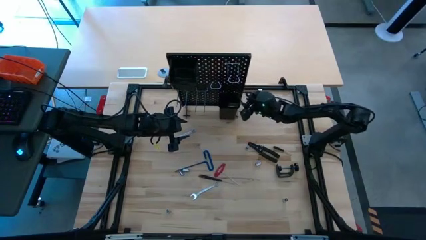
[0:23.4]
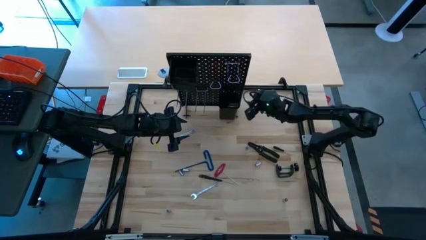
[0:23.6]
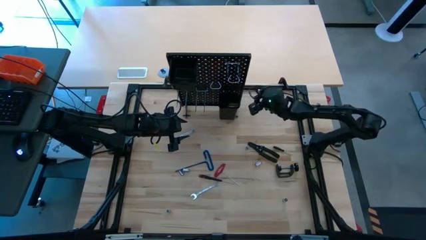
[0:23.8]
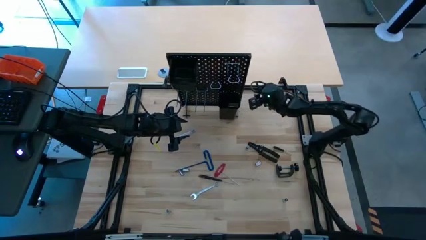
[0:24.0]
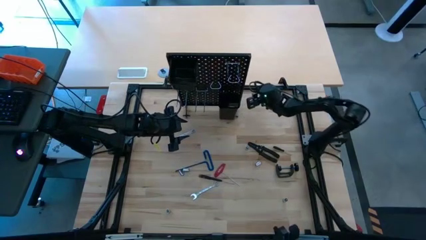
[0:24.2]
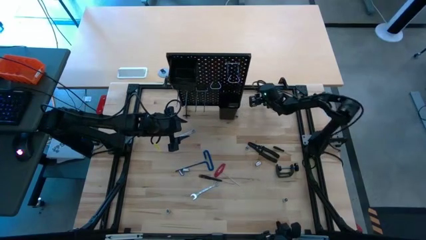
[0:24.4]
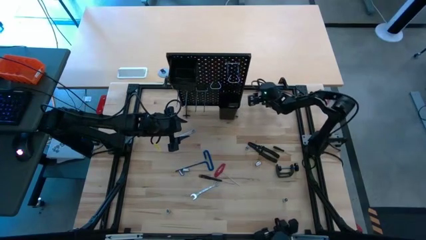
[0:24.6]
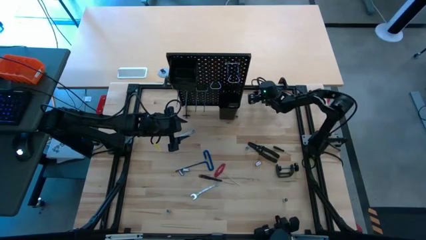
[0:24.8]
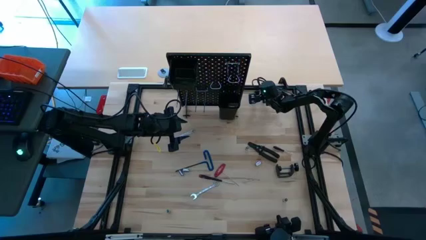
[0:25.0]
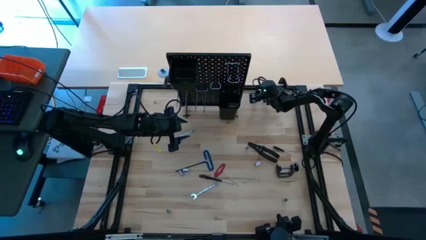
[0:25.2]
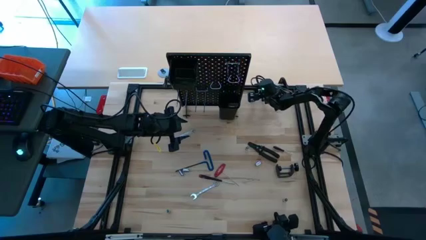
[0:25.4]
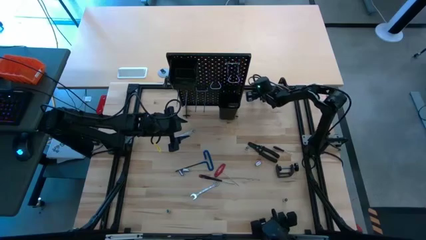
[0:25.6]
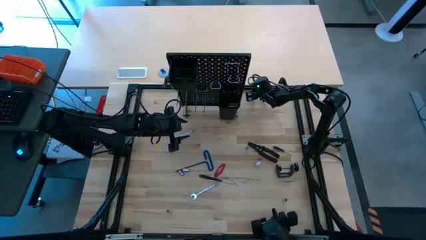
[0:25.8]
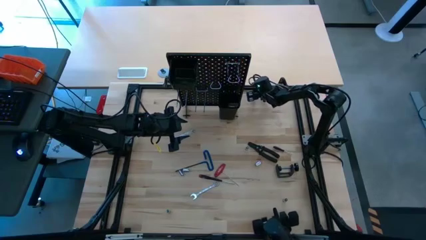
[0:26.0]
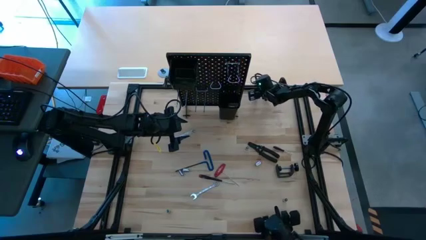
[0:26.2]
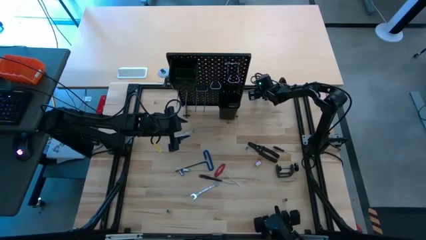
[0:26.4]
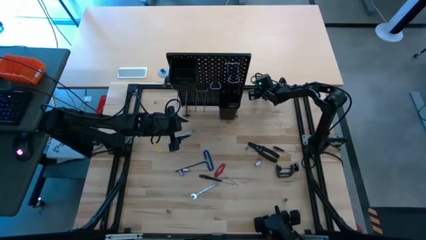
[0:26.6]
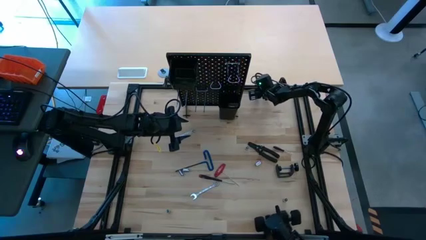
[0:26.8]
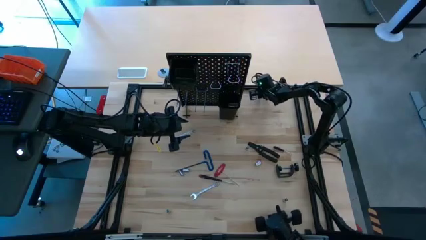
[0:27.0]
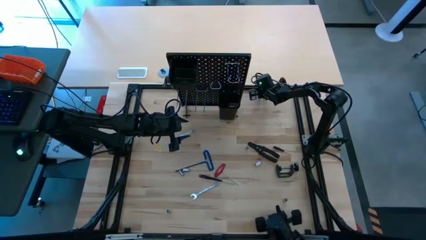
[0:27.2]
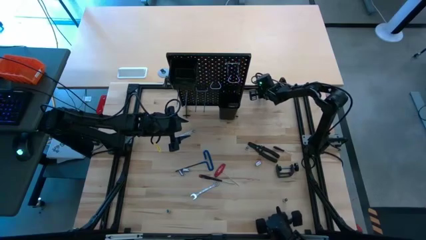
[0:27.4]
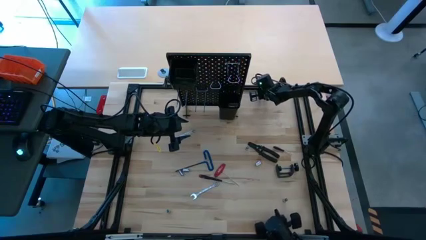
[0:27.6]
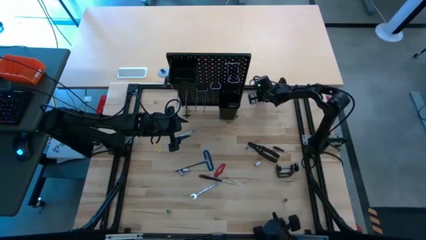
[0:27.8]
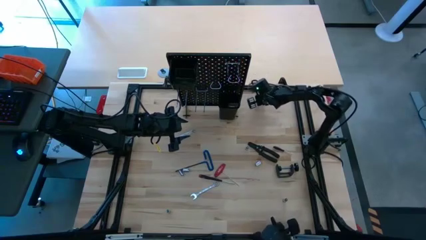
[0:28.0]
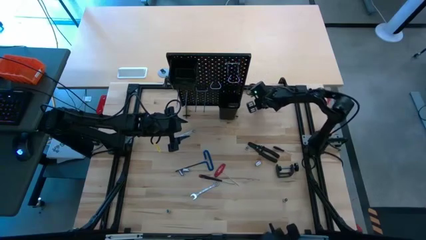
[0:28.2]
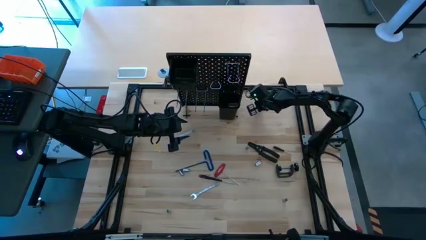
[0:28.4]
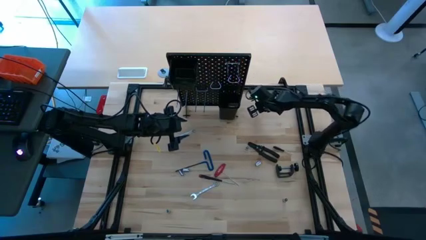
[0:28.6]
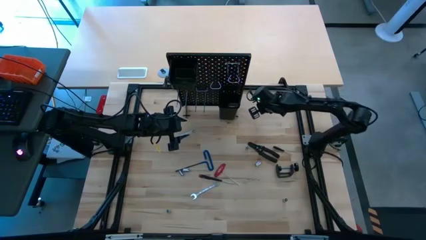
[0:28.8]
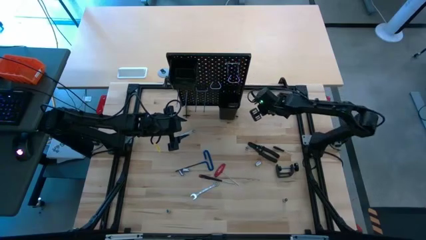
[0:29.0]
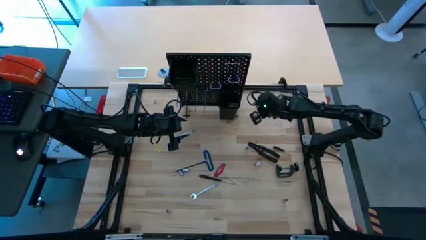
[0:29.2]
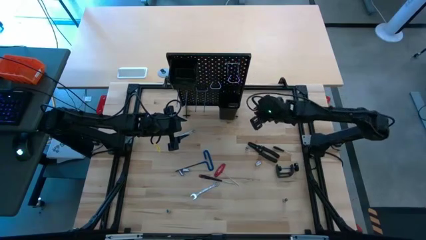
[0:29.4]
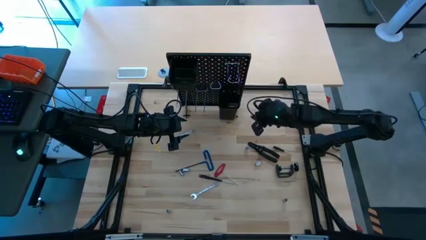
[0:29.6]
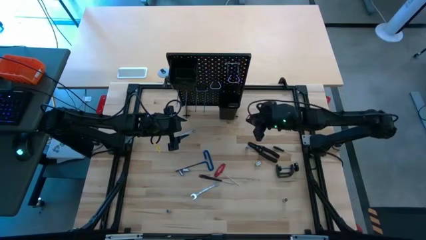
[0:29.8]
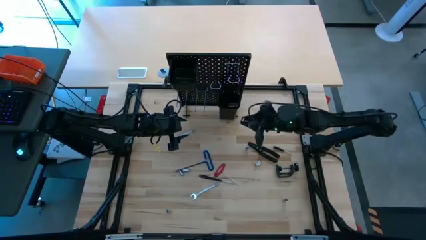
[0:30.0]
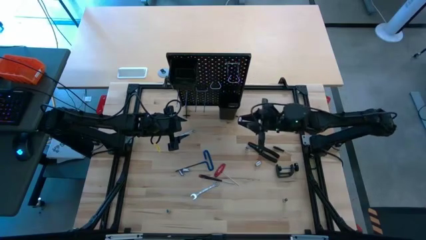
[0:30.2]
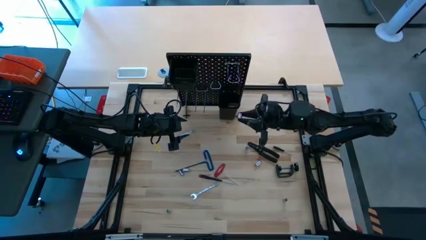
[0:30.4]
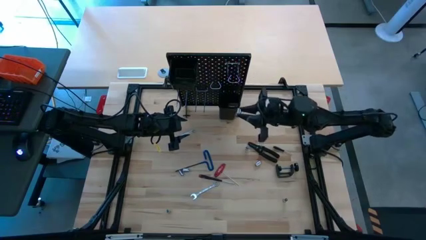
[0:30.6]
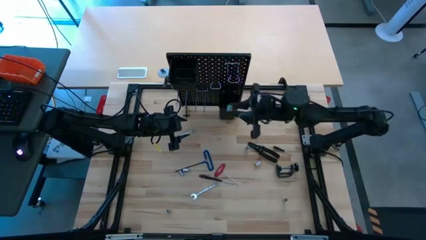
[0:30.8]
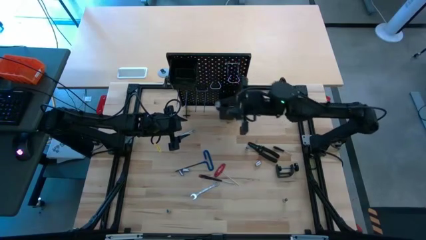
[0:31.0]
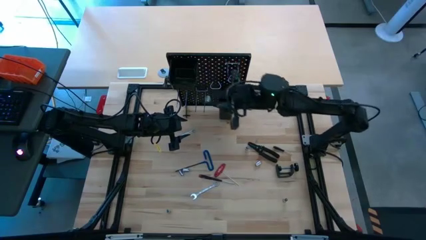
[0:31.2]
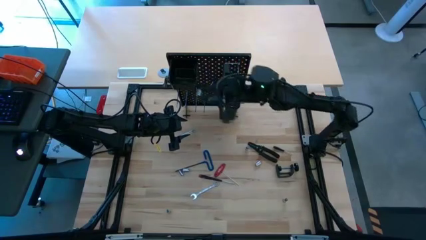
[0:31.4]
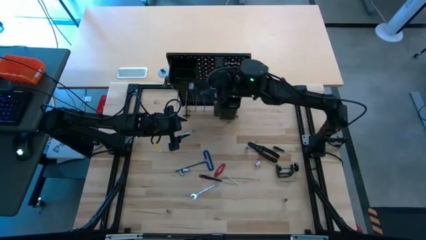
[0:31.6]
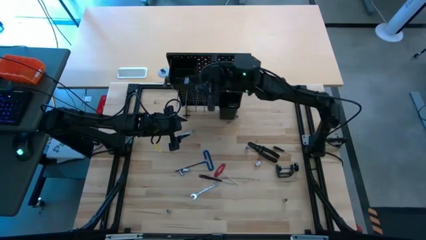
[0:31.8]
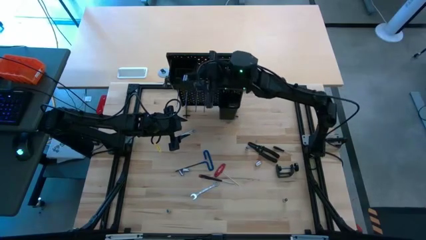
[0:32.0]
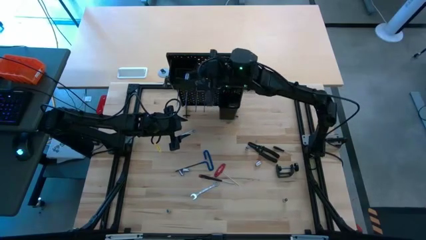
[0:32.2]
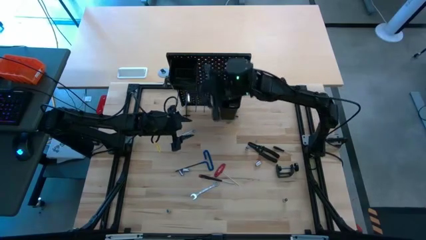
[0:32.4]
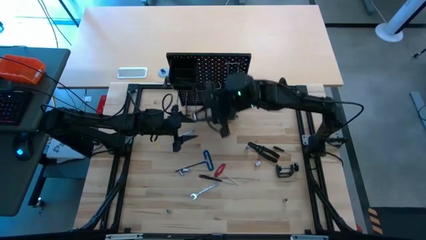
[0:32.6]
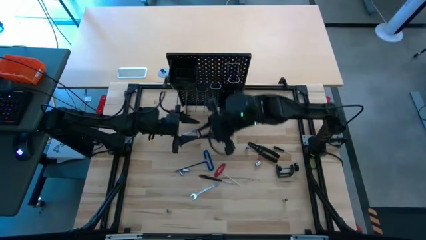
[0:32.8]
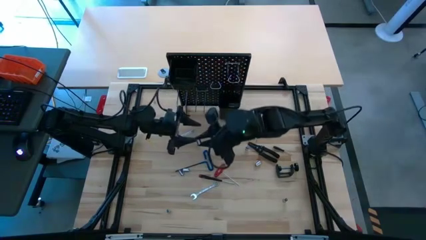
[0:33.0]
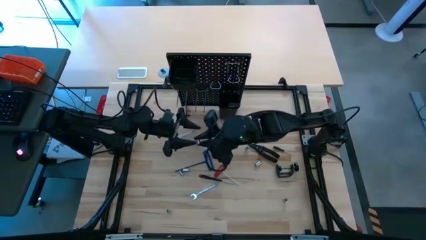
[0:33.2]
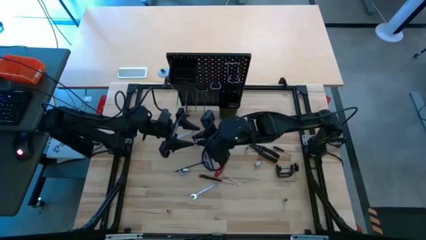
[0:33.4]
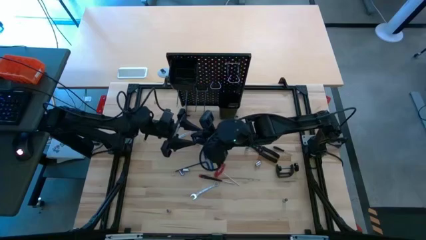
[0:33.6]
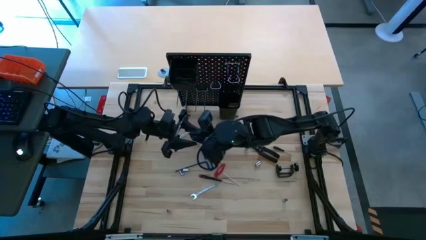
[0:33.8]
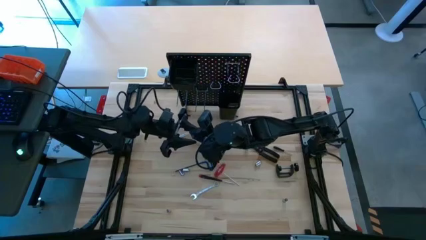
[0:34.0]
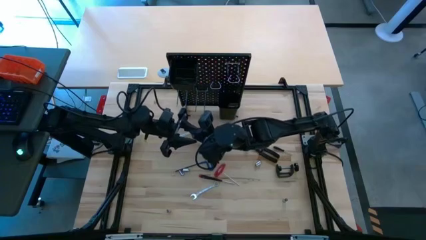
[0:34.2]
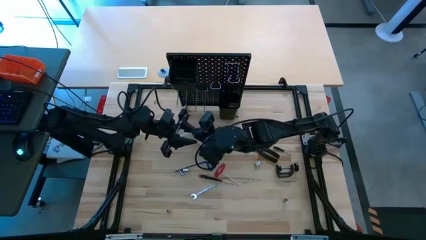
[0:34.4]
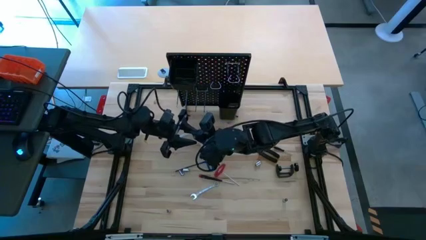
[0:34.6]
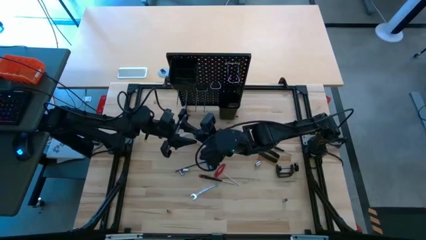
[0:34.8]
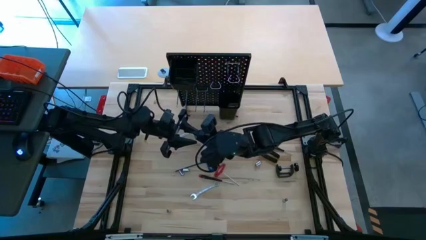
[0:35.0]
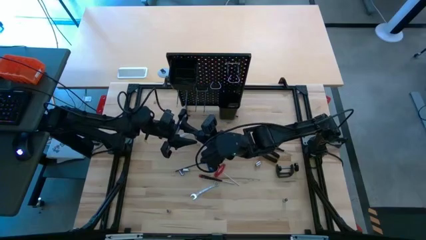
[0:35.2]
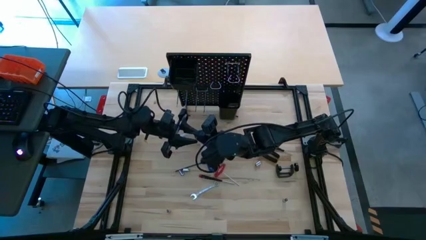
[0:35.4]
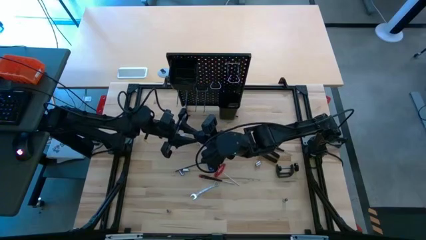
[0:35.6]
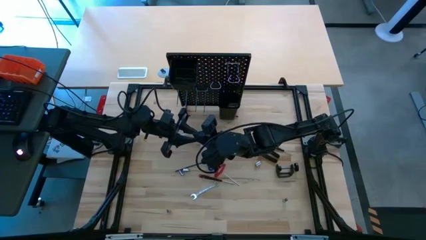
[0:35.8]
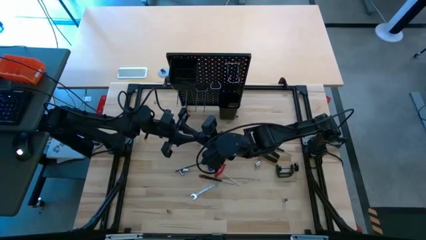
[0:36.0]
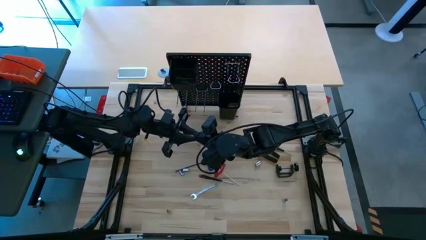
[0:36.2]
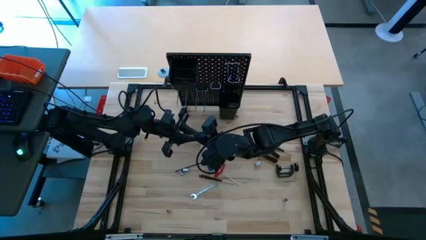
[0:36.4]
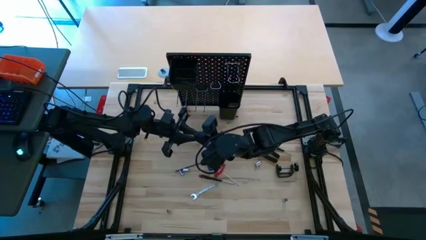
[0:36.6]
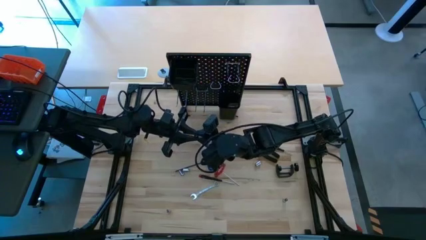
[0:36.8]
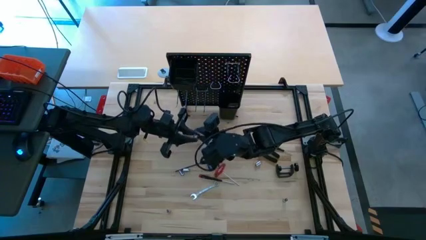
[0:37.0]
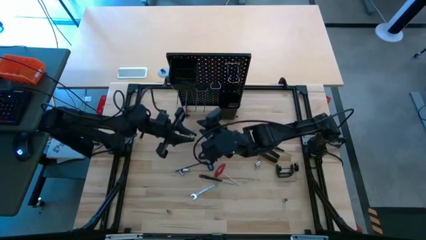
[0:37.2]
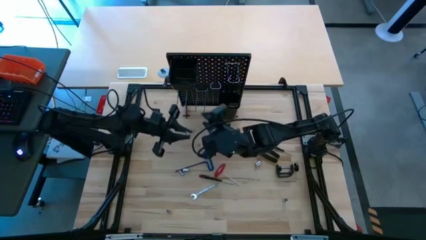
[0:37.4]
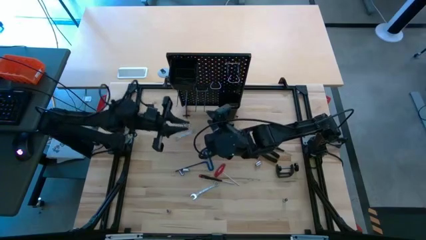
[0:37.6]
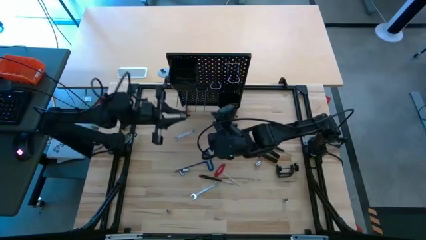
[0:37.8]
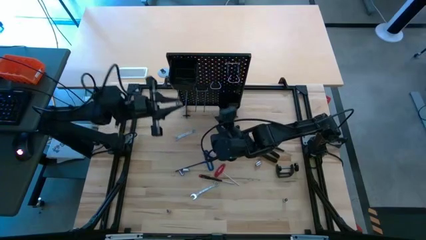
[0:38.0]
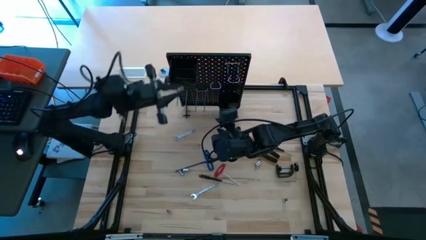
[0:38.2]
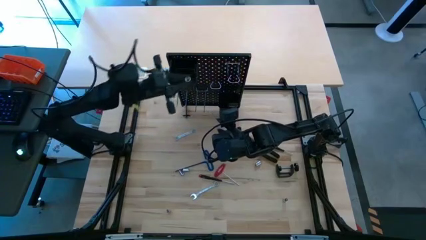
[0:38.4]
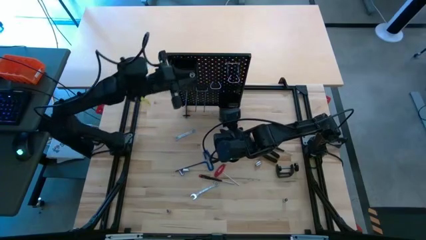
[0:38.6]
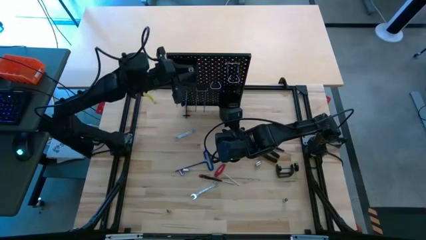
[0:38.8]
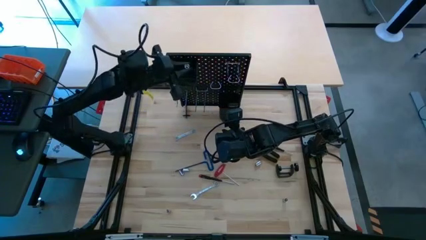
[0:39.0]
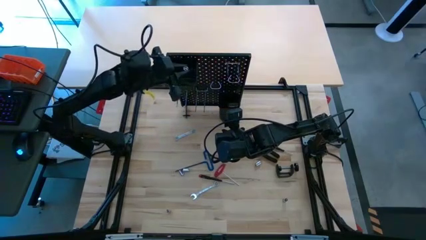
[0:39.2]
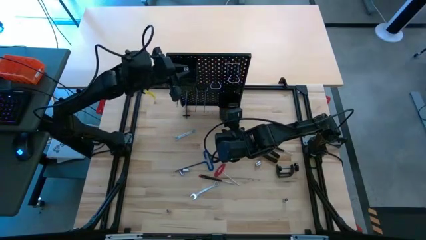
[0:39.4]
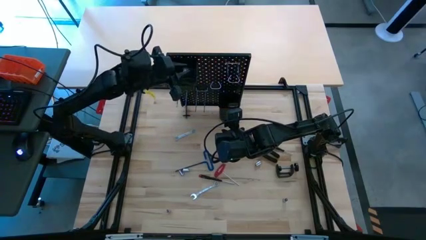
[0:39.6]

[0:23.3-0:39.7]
Task: Hang tools onto peg board
Put the socket into the top black bin on the pegboard
